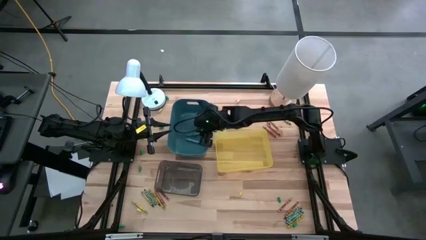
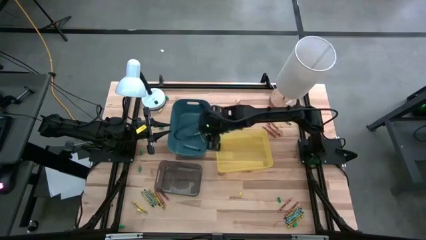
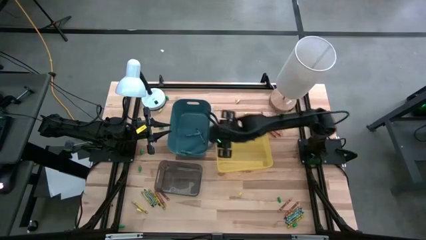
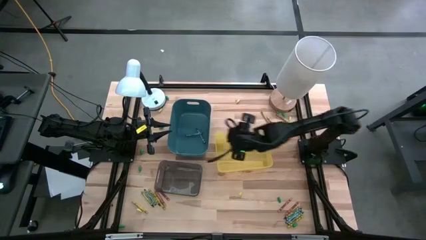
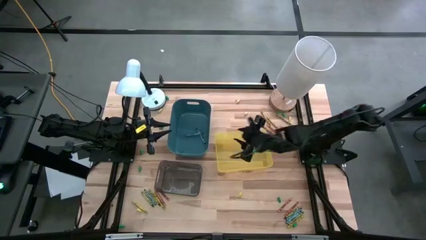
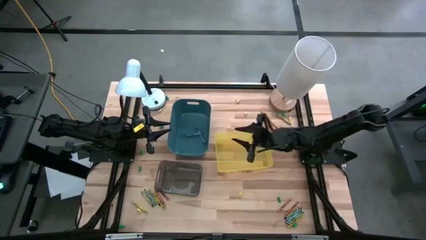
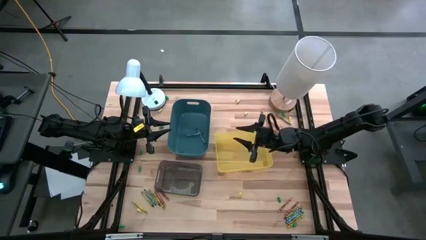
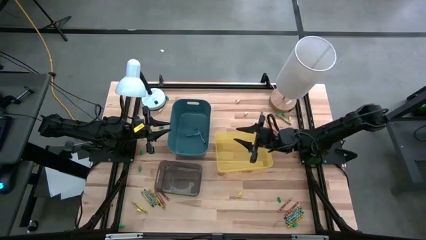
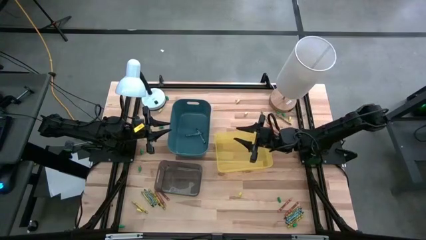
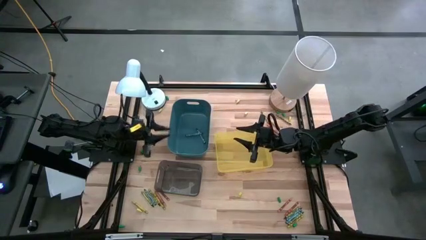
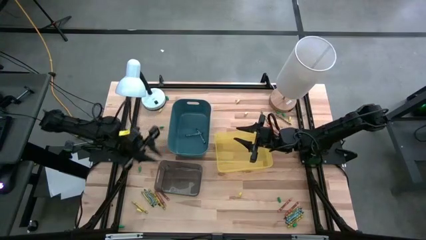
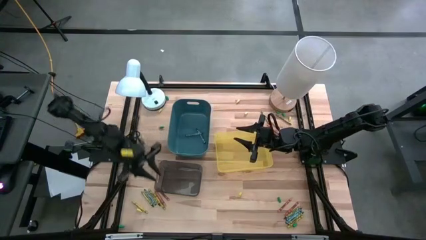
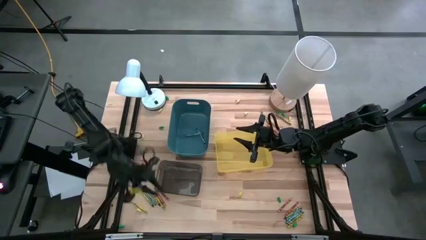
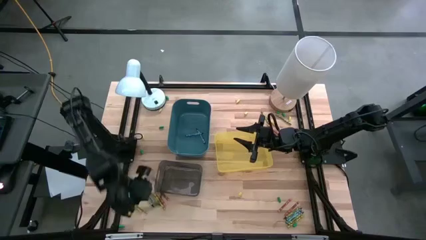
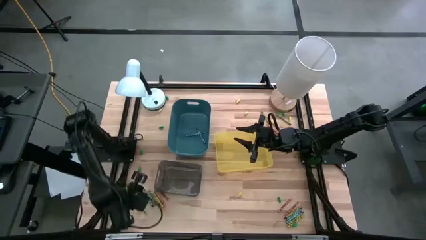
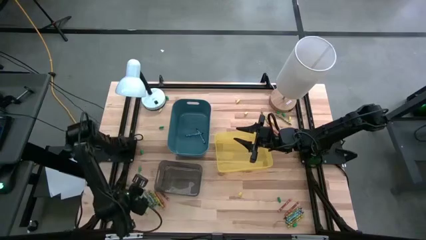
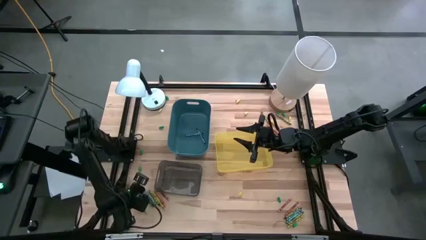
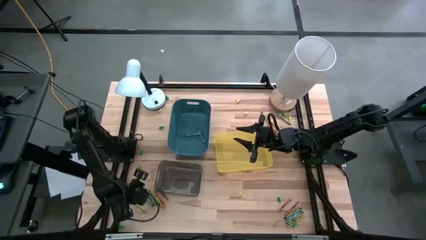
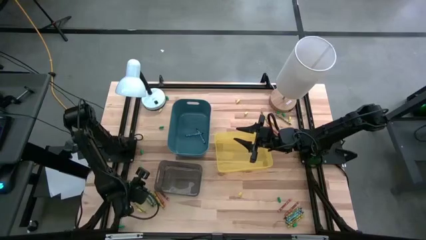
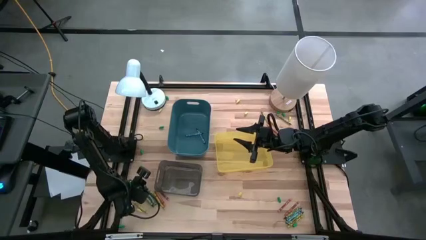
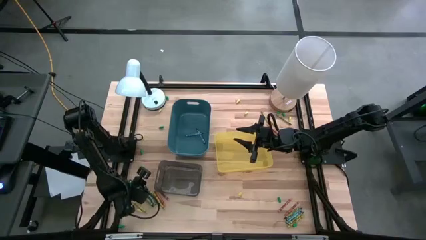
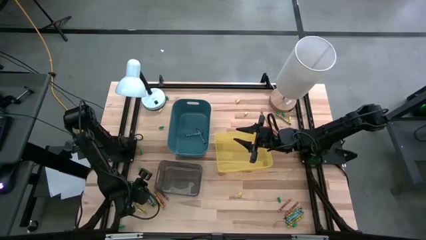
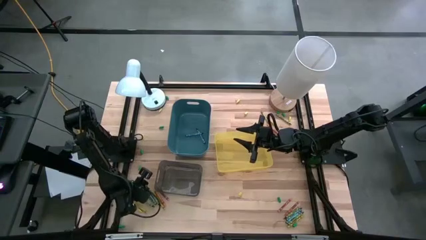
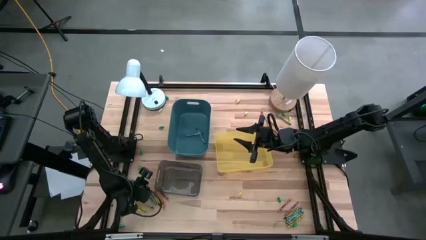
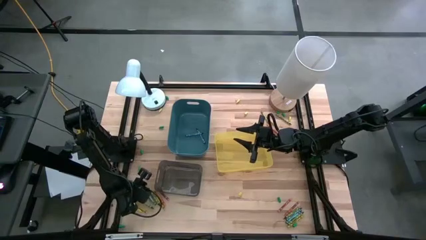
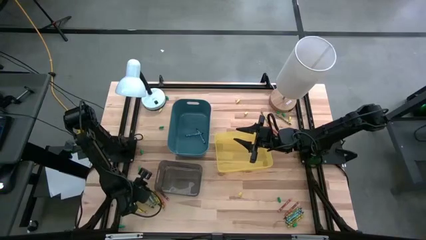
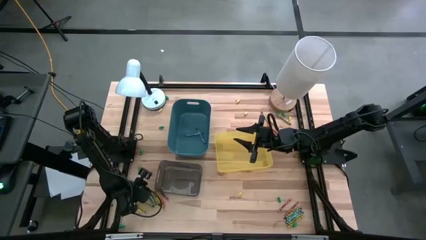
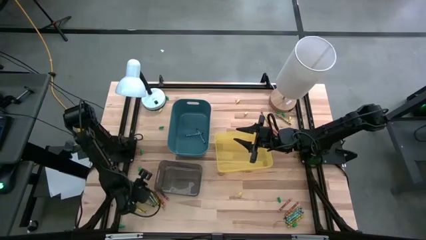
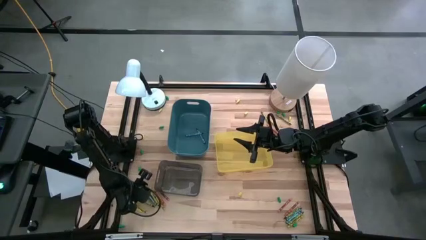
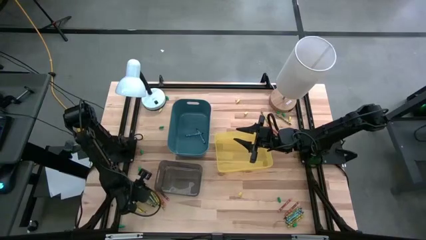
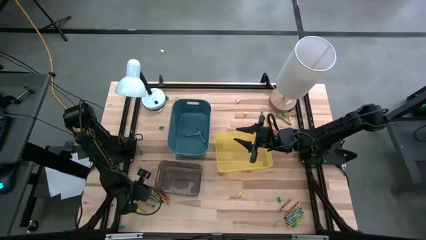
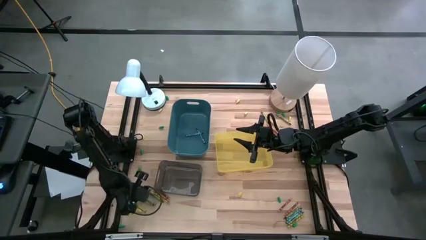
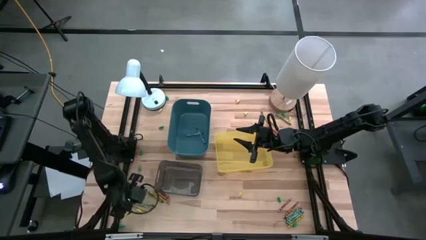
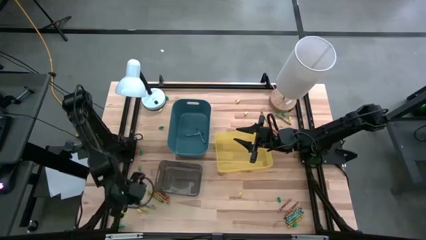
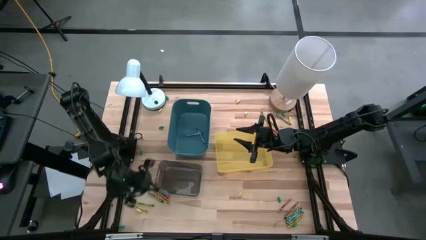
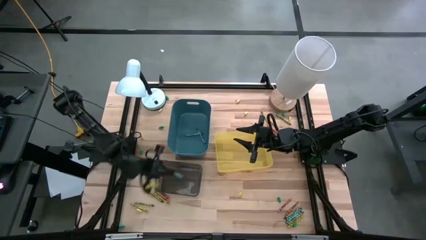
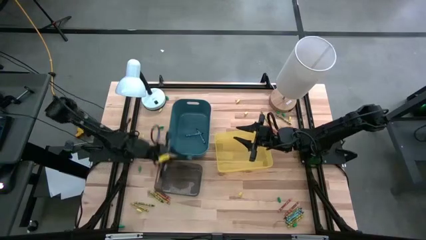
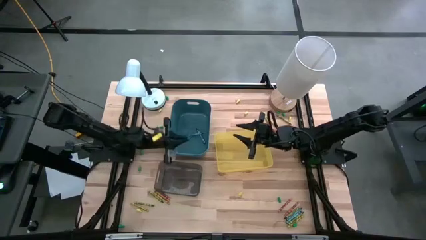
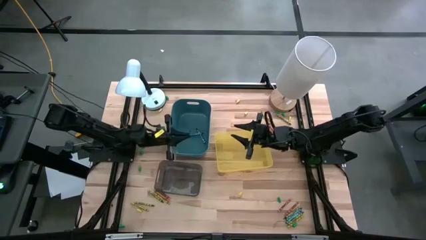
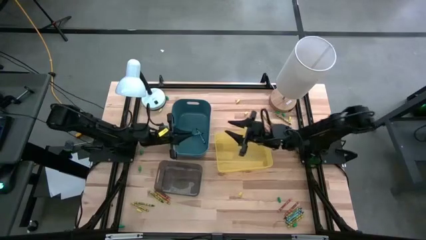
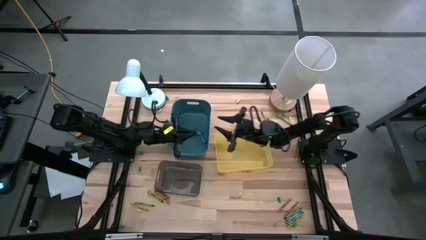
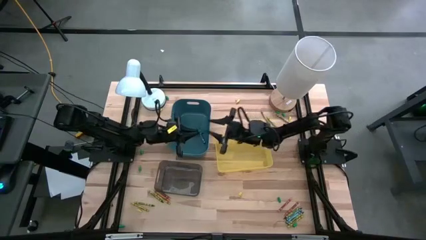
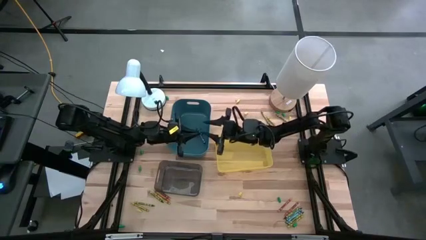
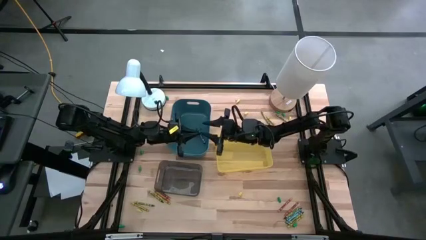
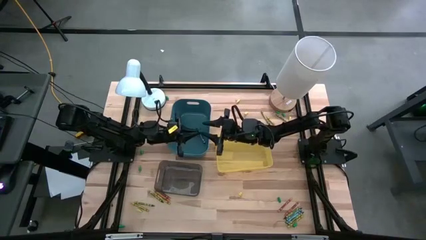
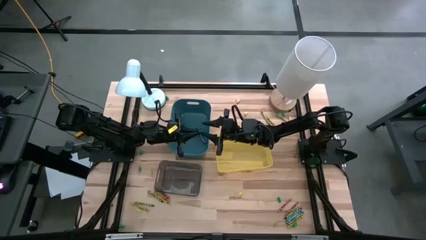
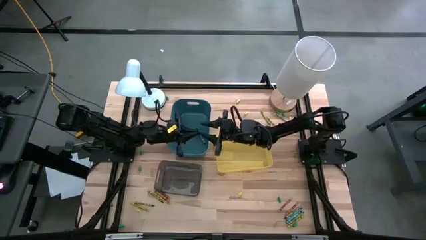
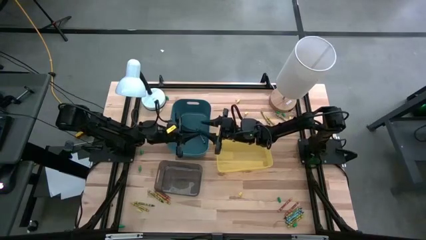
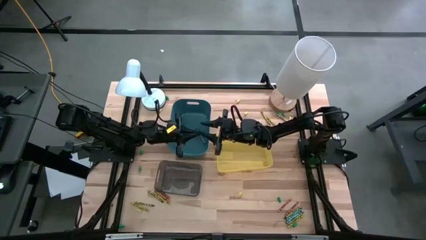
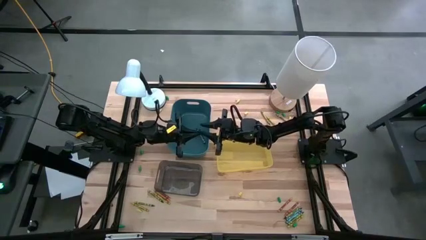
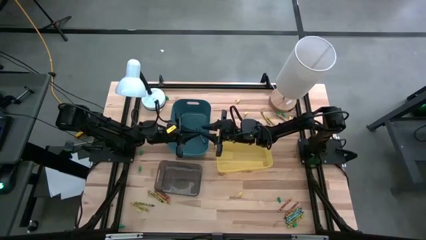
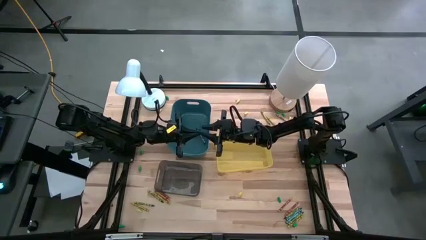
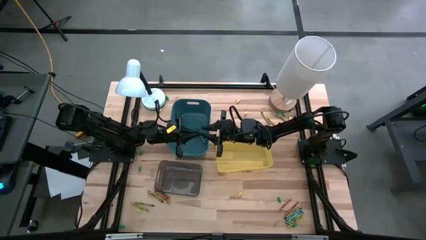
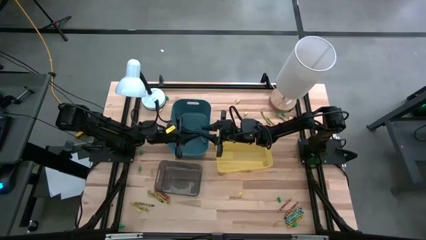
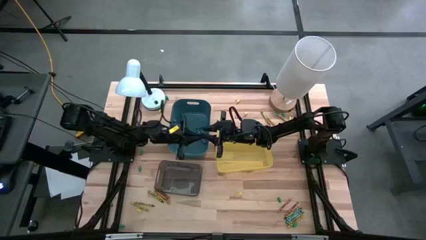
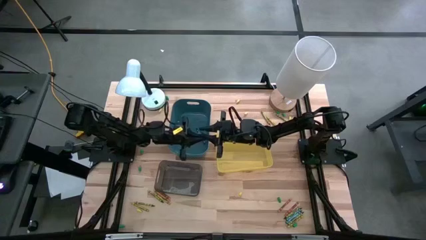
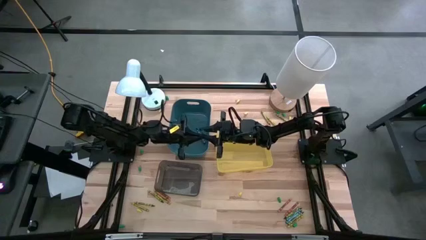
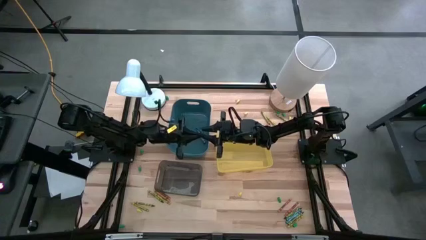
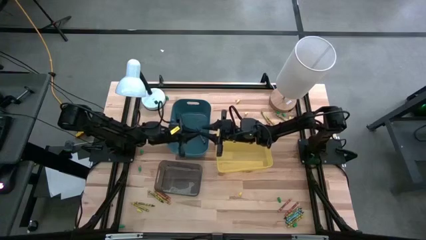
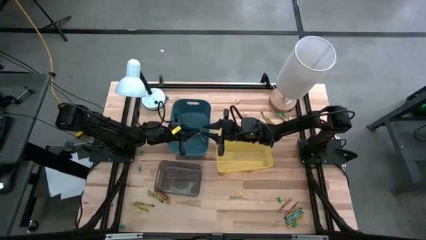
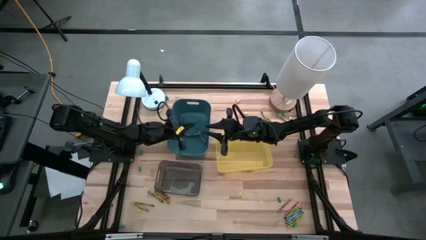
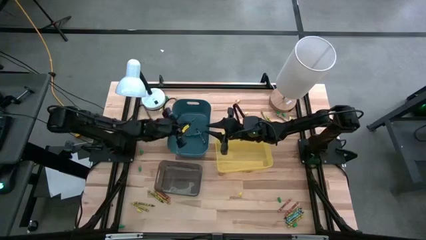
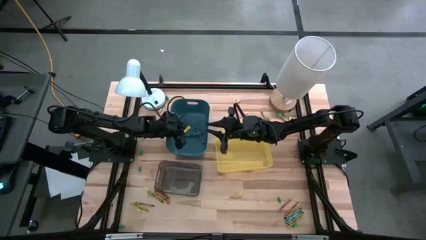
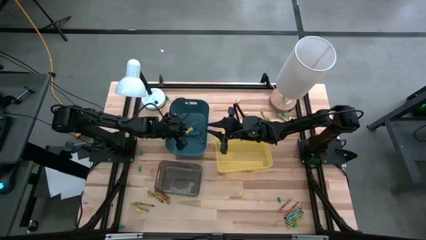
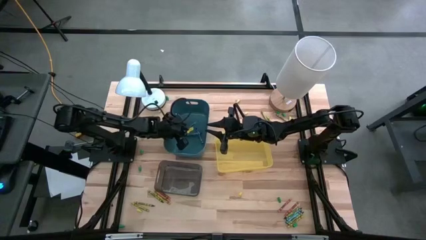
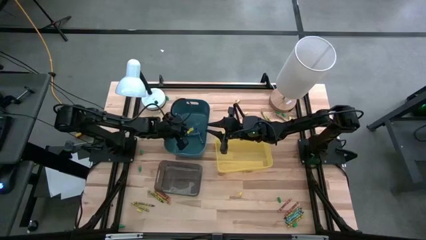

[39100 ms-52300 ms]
Task: Sort crayons
Put the blue crayon into the blue bin

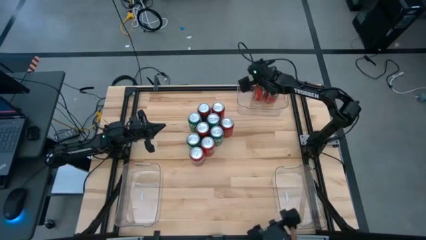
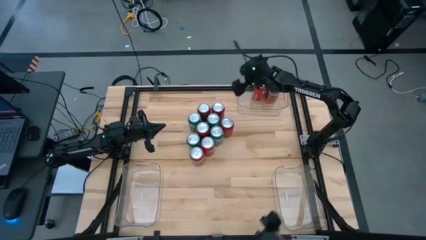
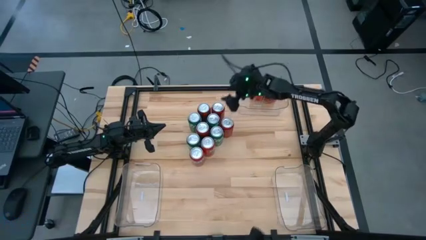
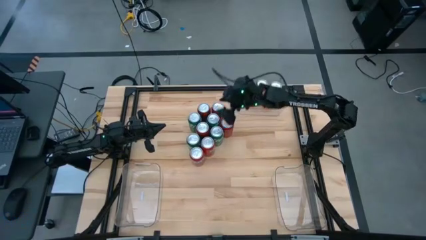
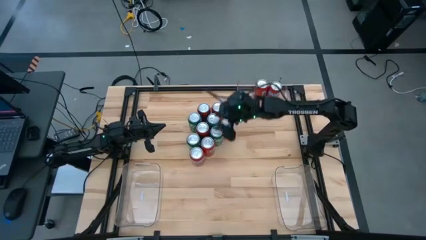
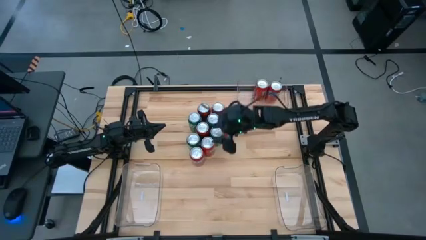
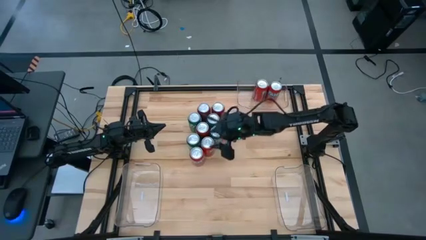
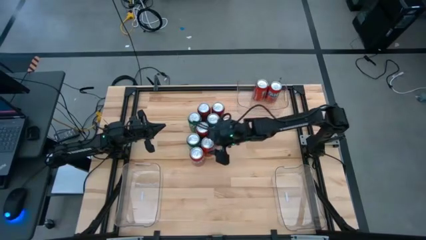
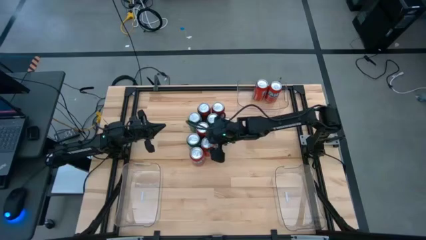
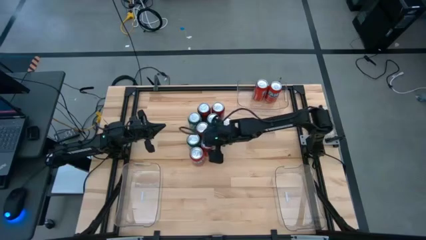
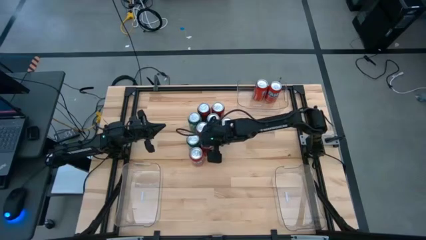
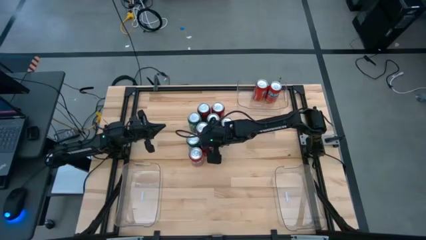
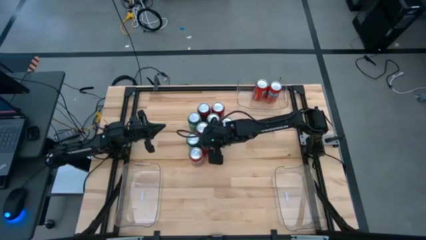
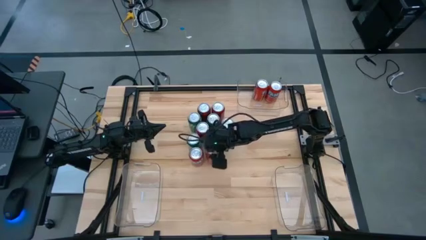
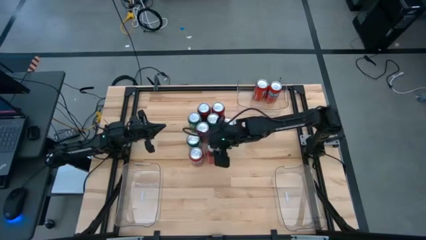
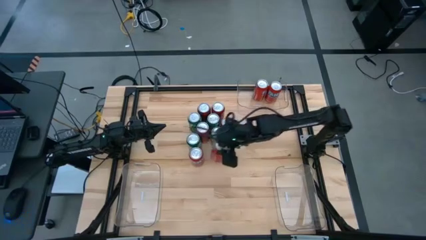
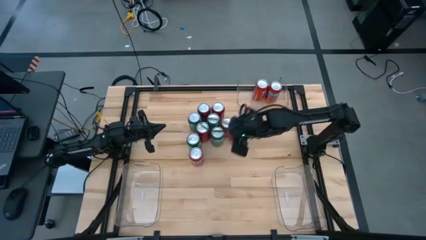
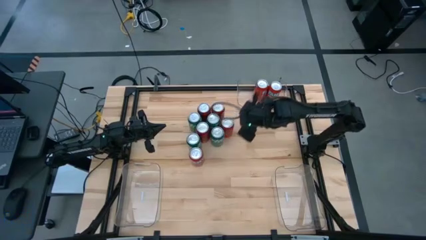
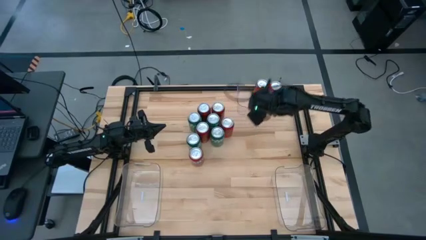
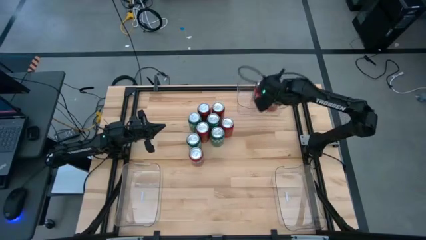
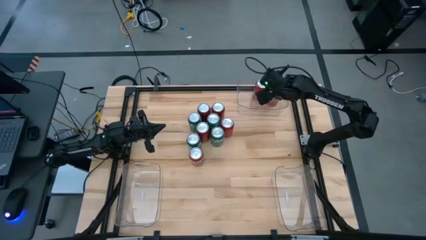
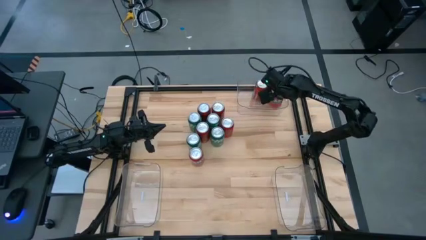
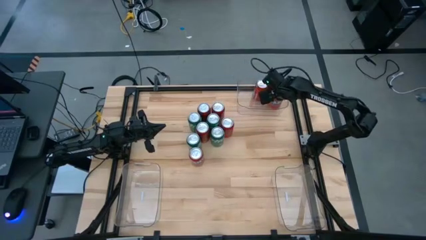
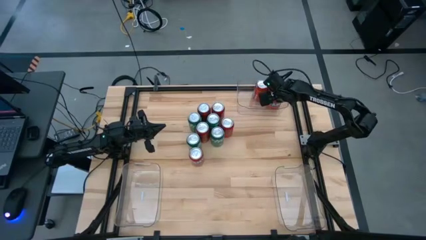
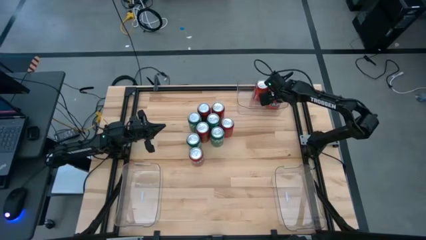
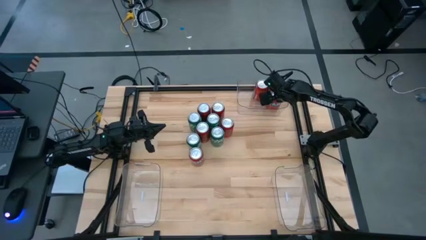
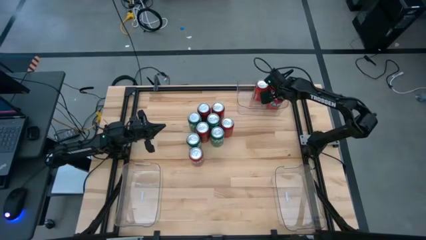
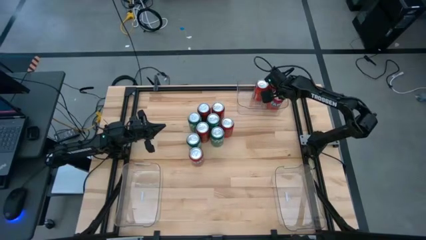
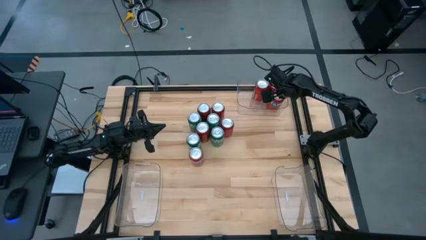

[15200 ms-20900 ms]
Task: Sort soda cans
Put the top orange soda can into the top transparent bin
